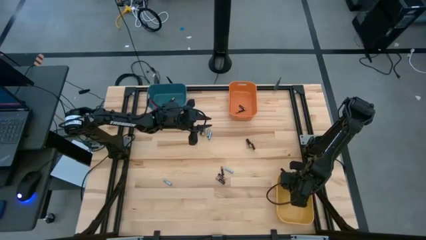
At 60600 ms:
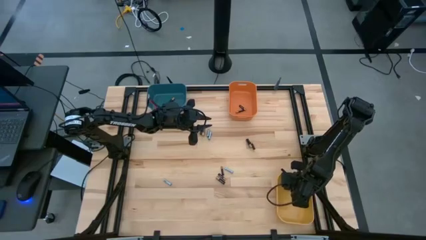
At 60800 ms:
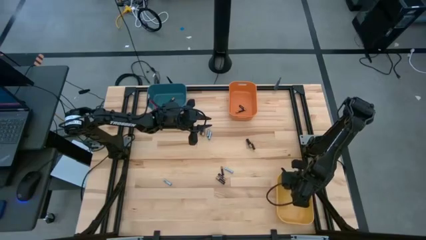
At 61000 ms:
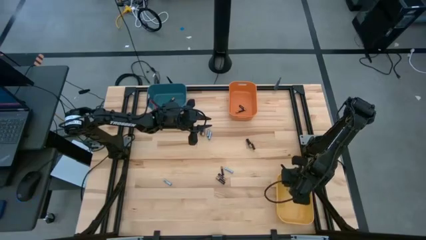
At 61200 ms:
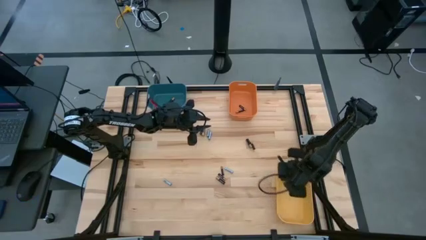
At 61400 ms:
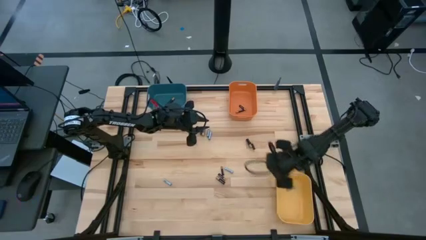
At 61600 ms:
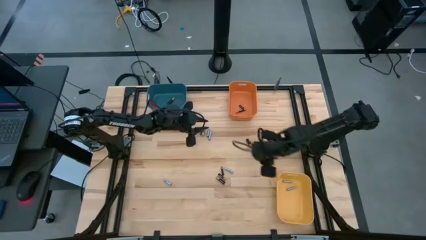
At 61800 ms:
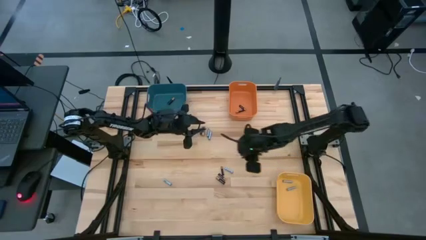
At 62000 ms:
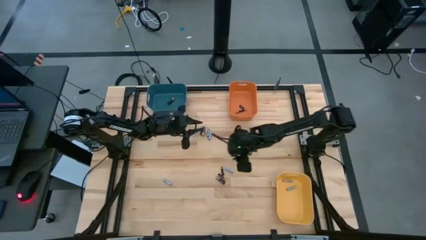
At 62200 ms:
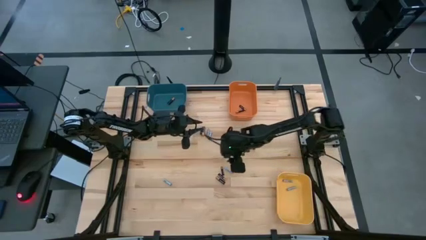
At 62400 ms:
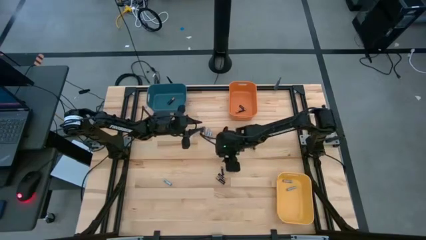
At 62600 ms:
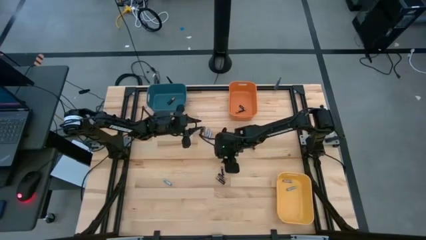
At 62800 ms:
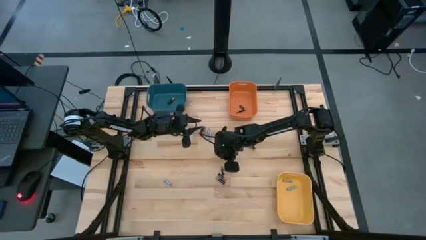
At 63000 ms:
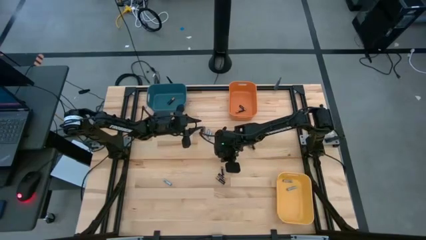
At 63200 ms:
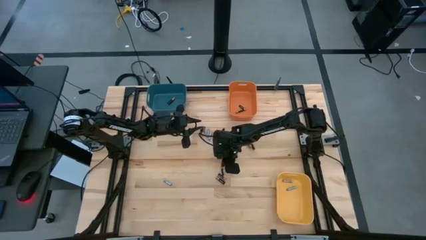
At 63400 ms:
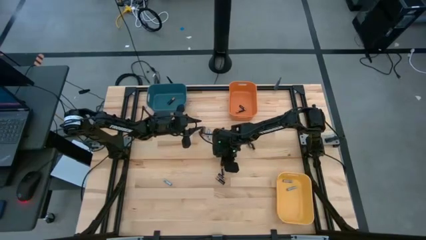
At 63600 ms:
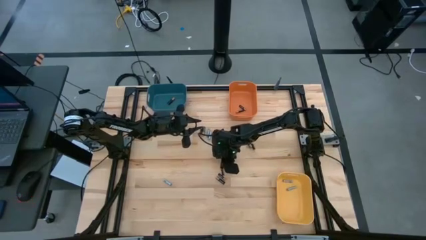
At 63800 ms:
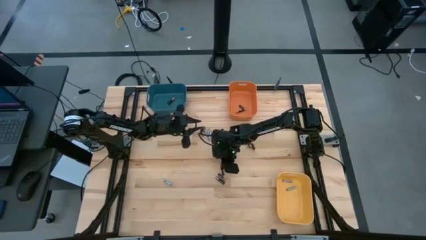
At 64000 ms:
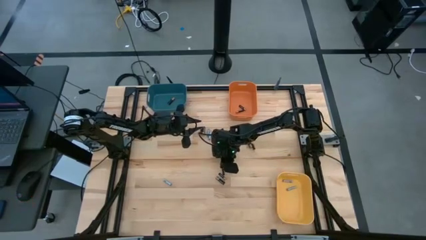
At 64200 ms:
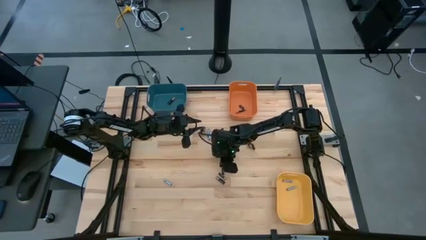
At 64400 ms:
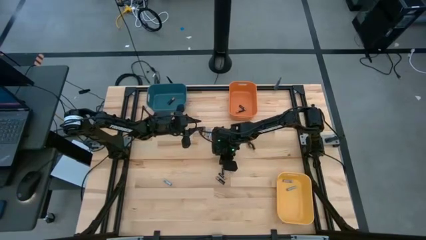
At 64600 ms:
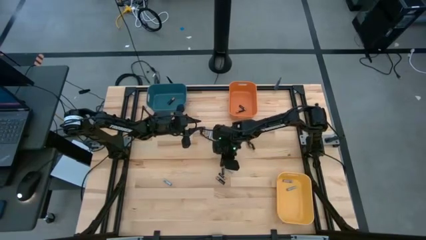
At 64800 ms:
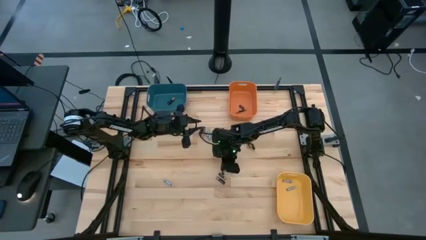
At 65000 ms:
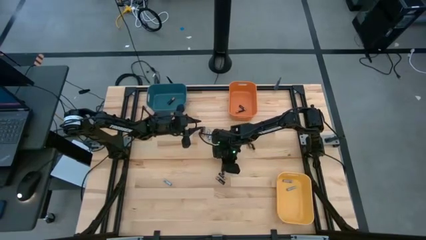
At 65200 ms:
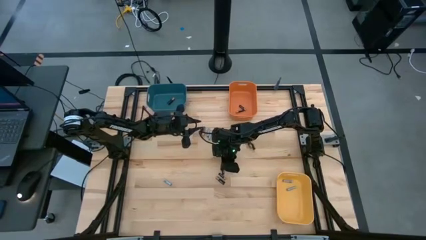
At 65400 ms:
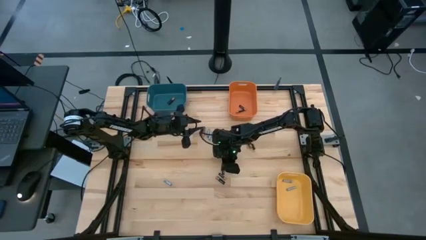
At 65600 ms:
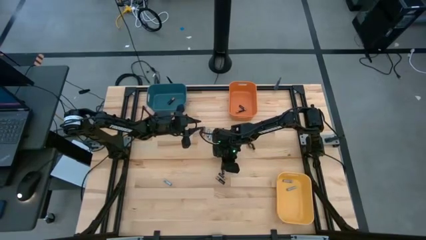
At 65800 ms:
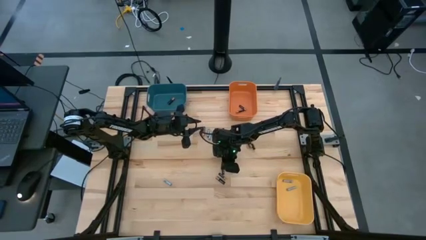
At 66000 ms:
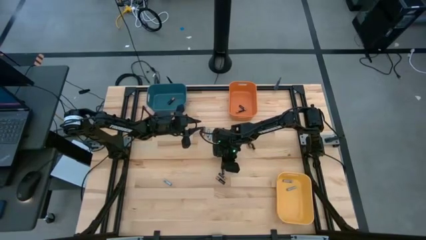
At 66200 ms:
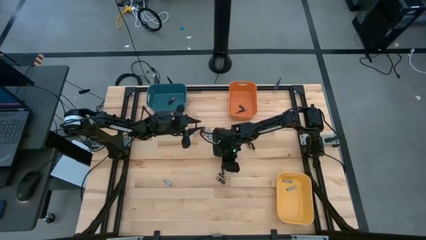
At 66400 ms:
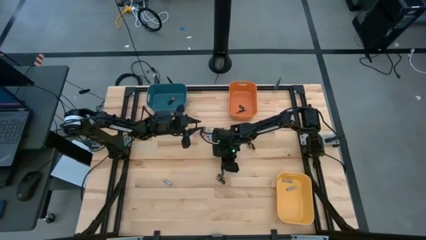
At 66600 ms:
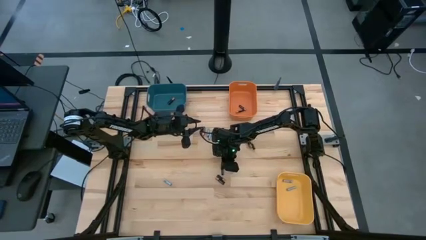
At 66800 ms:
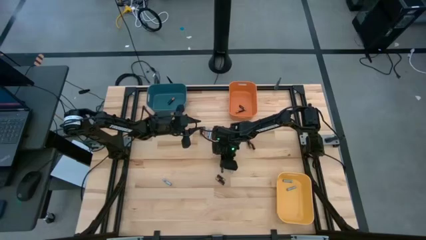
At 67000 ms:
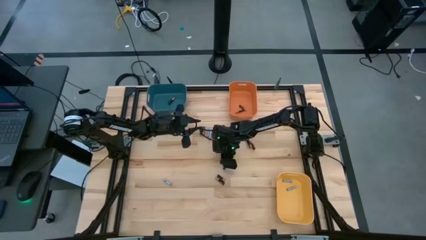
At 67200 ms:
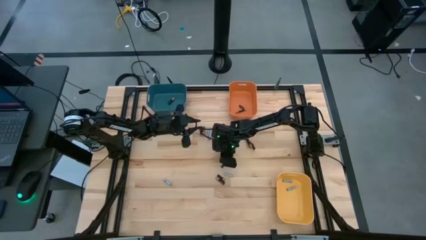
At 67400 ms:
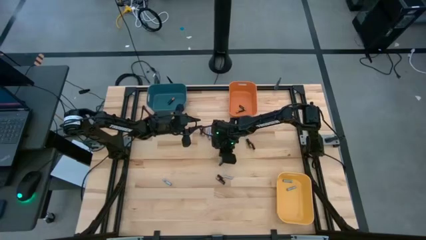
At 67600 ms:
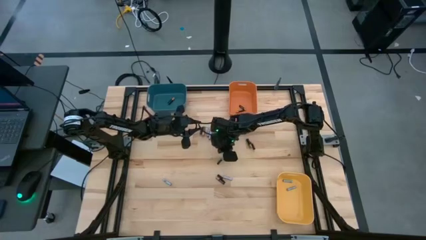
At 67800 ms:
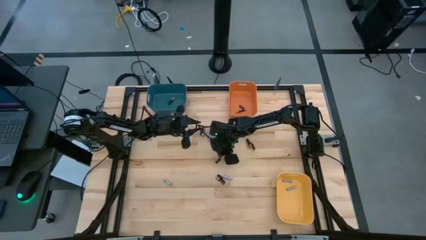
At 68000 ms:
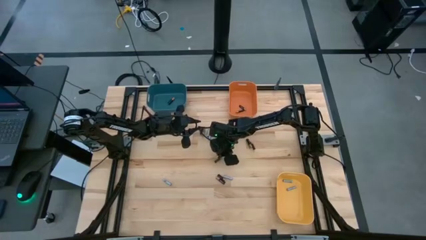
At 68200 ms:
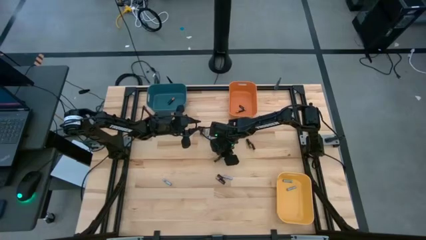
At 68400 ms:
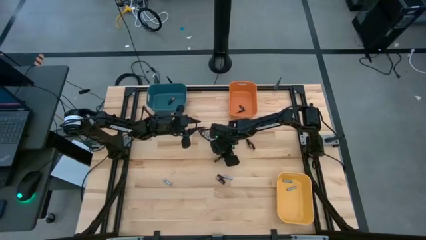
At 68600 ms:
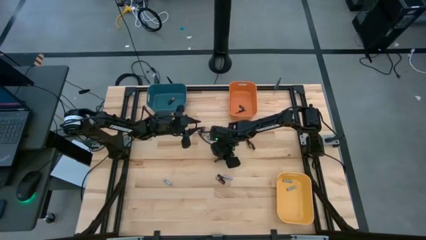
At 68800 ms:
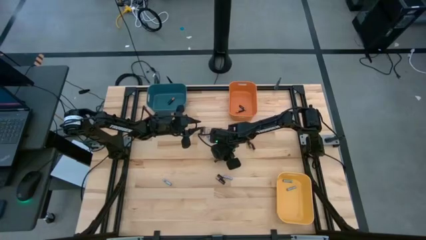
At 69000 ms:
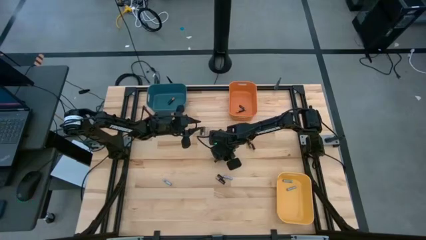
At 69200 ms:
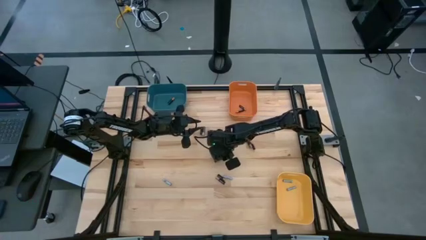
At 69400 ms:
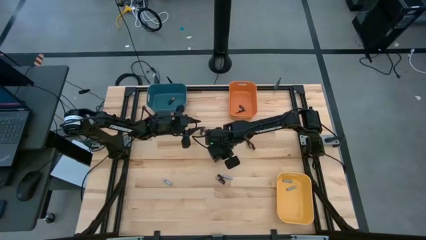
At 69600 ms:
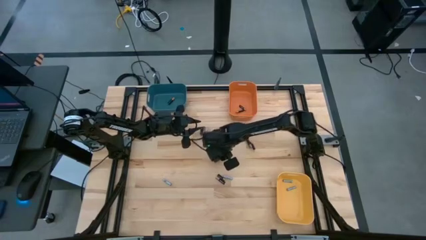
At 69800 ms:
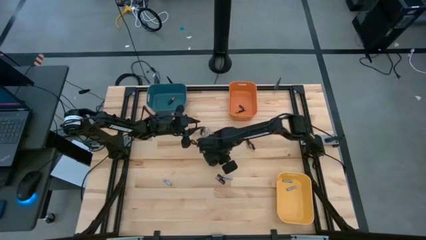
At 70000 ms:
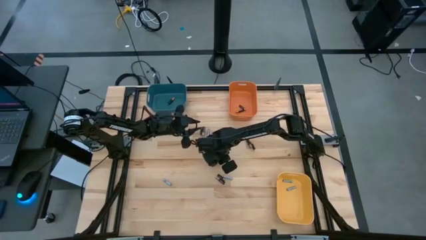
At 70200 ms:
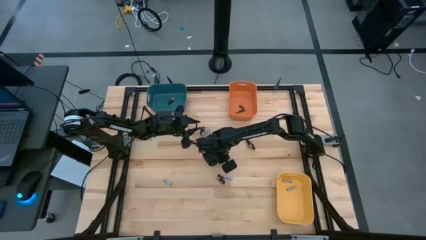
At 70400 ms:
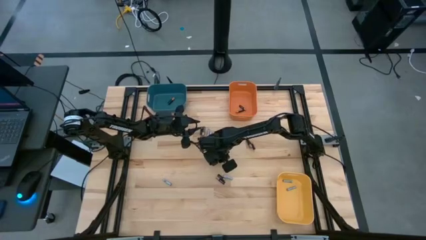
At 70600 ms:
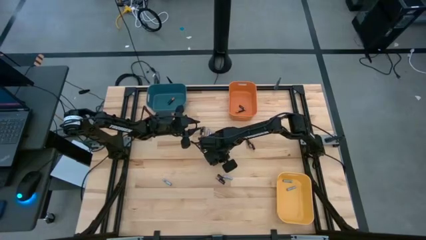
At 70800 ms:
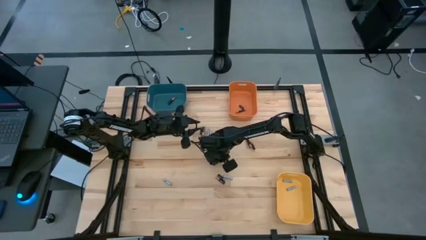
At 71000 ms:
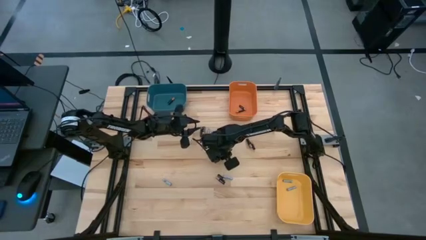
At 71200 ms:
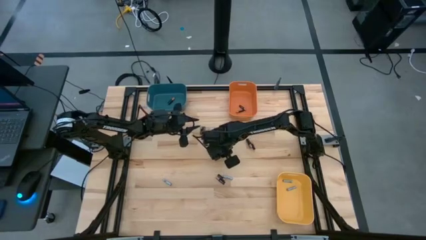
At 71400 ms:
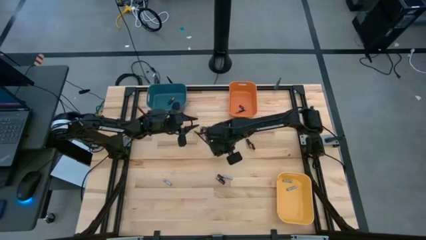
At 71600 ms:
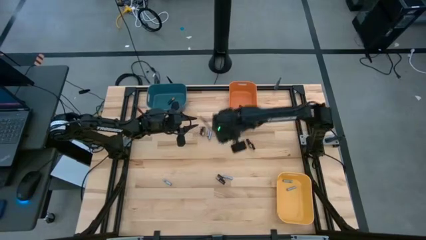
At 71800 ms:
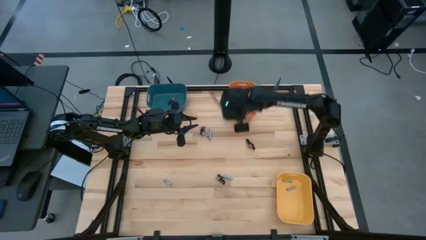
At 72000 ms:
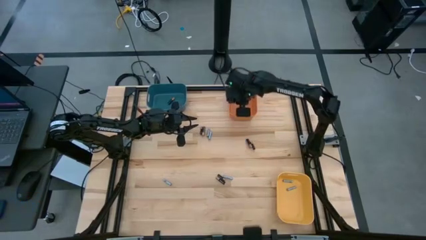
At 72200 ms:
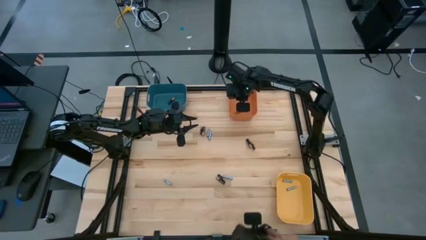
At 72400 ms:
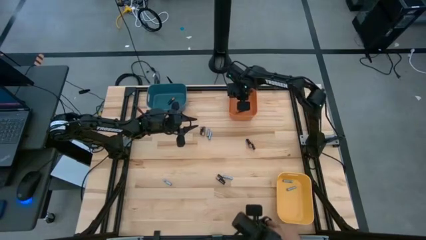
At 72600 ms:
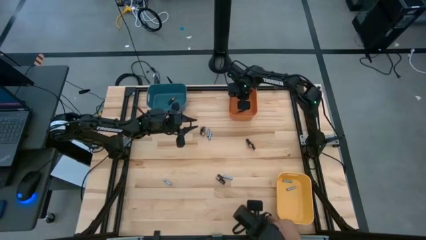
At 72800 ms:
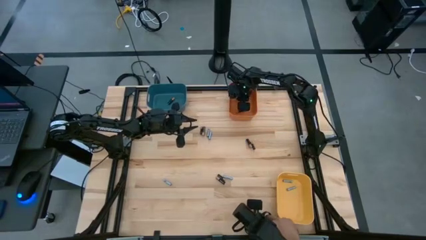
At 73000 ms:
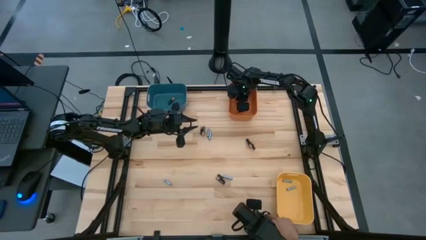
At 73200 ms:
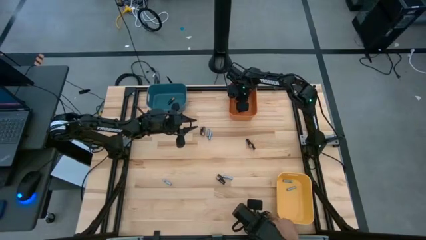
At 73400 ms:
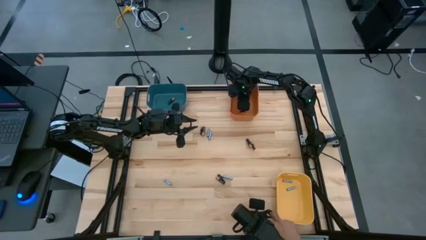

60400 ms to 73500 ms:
Task: Sort batteries
Put the small black battery into the orange bin
